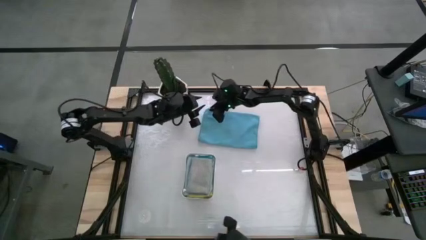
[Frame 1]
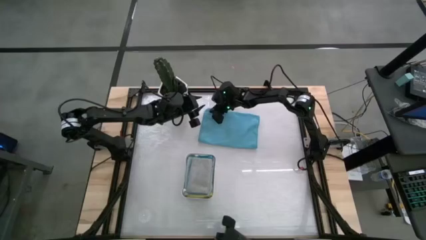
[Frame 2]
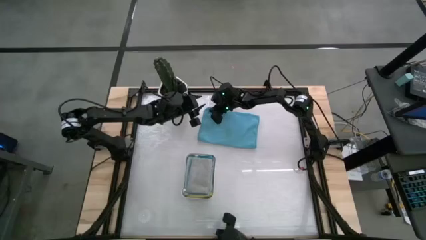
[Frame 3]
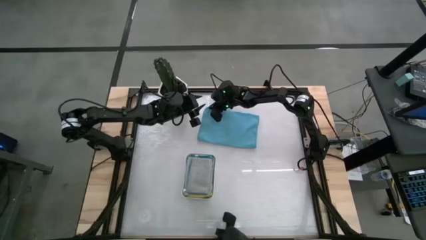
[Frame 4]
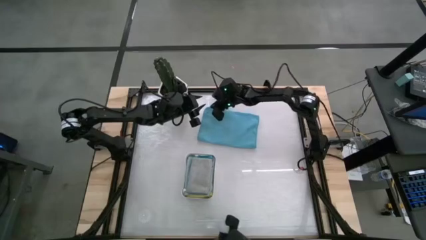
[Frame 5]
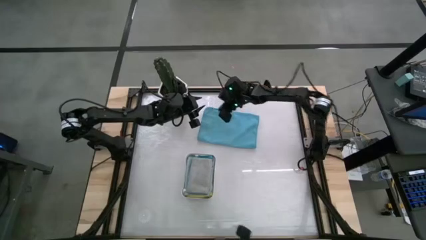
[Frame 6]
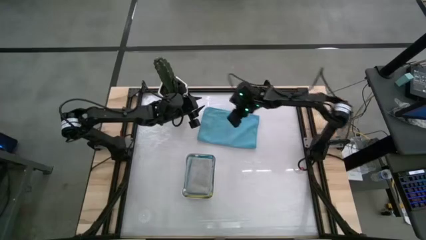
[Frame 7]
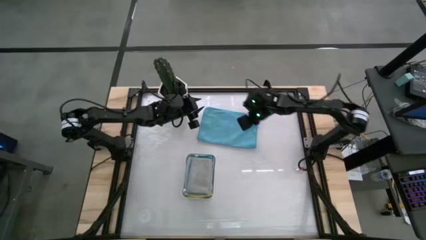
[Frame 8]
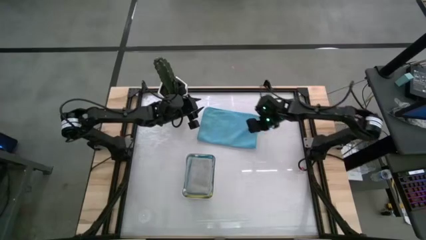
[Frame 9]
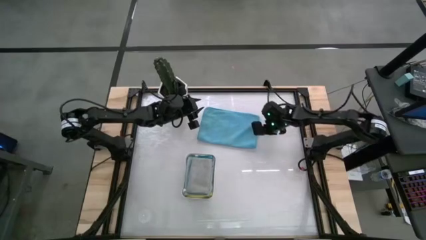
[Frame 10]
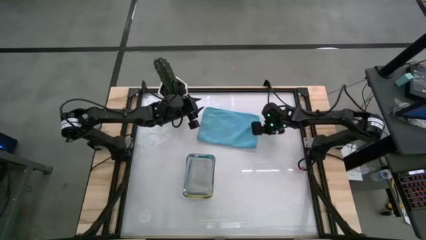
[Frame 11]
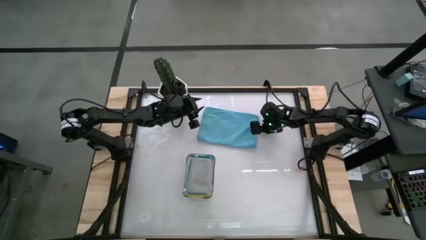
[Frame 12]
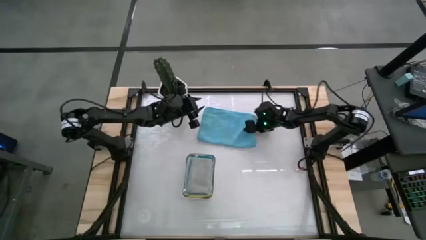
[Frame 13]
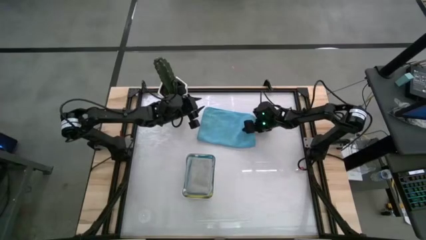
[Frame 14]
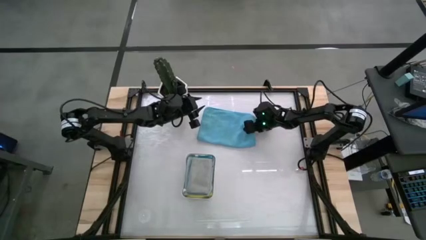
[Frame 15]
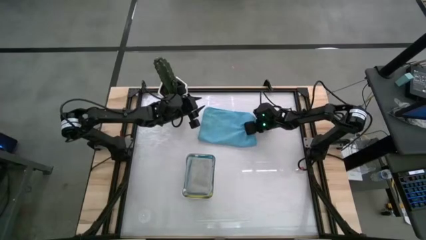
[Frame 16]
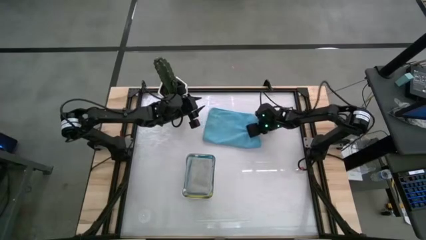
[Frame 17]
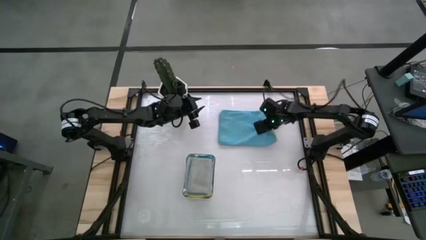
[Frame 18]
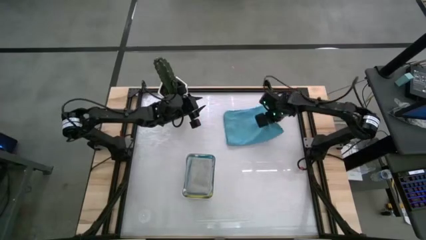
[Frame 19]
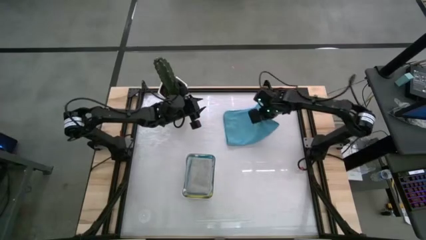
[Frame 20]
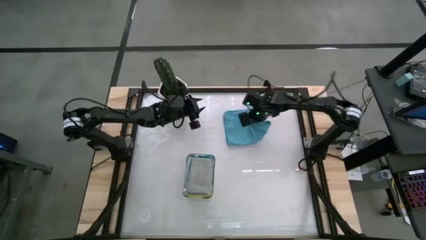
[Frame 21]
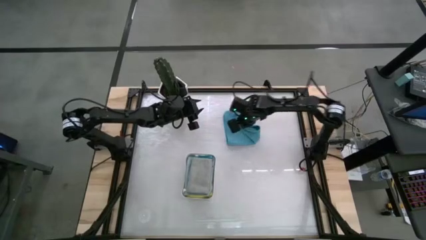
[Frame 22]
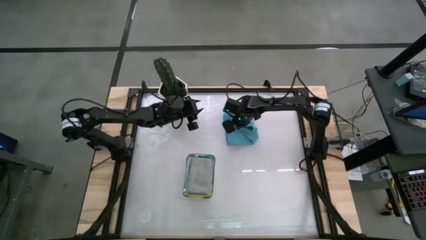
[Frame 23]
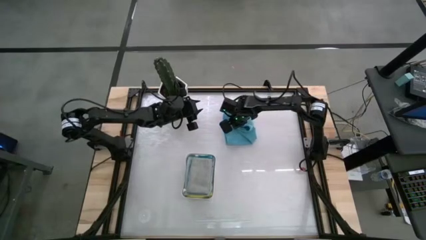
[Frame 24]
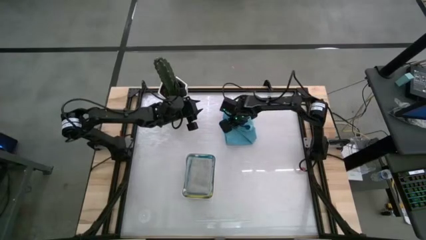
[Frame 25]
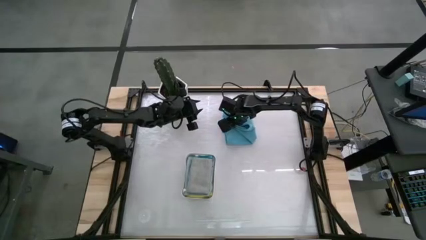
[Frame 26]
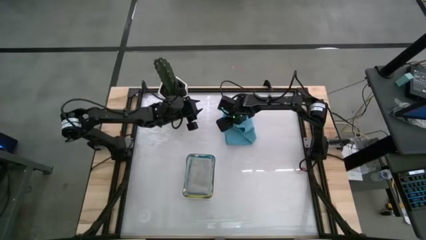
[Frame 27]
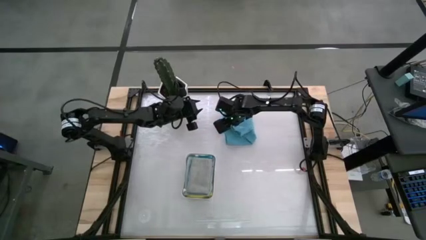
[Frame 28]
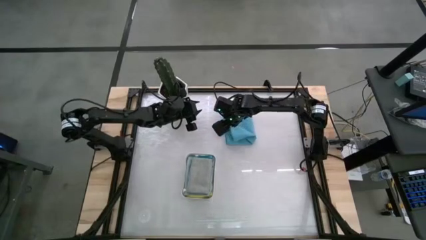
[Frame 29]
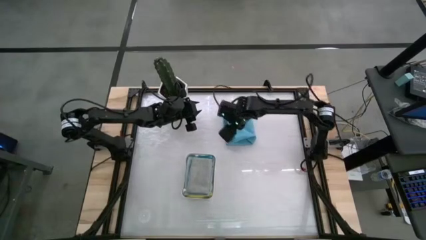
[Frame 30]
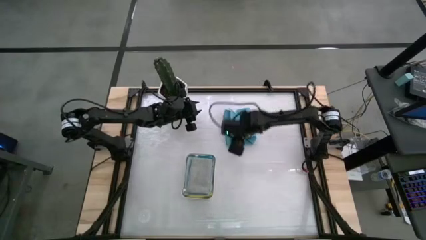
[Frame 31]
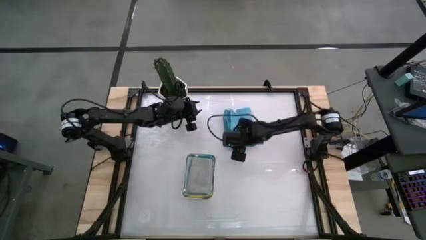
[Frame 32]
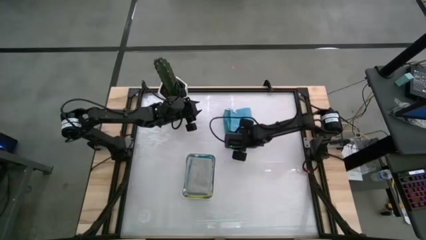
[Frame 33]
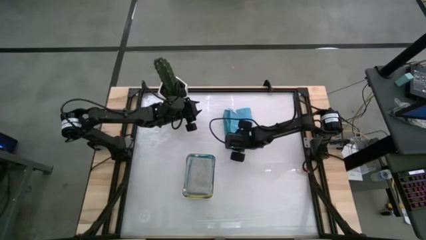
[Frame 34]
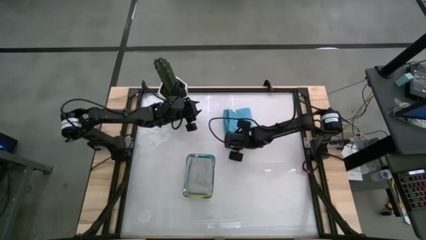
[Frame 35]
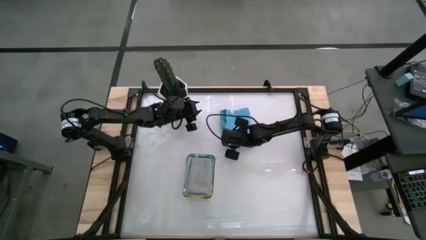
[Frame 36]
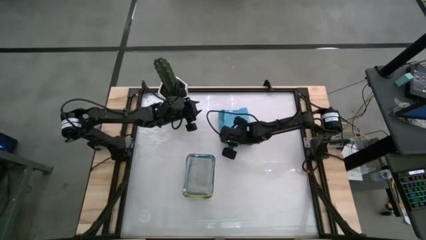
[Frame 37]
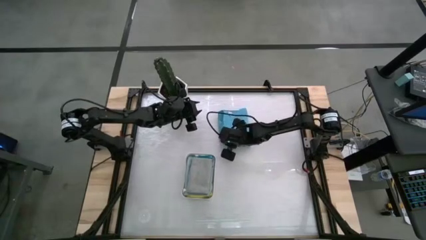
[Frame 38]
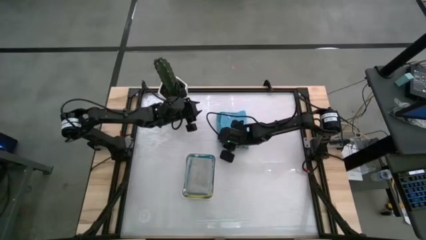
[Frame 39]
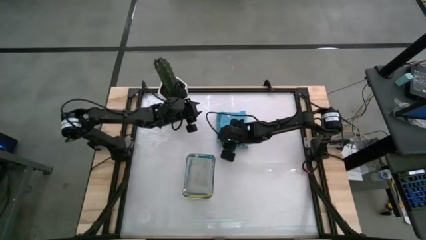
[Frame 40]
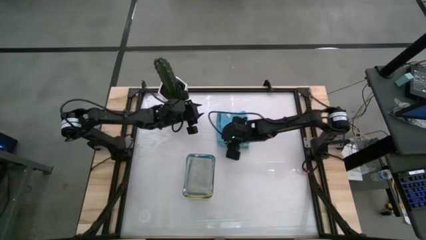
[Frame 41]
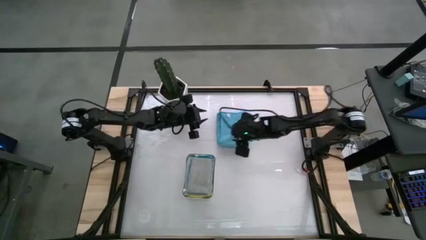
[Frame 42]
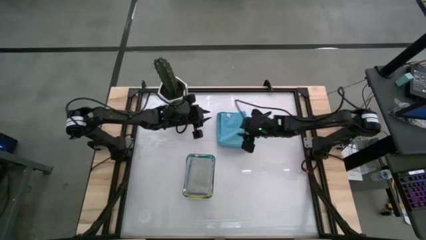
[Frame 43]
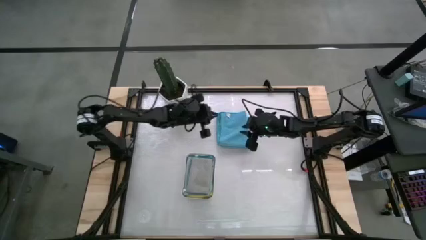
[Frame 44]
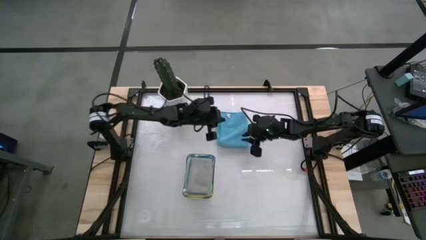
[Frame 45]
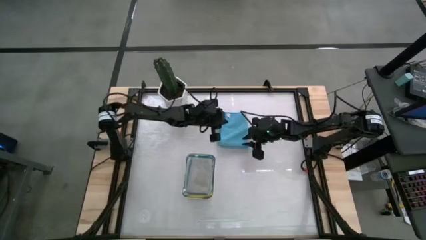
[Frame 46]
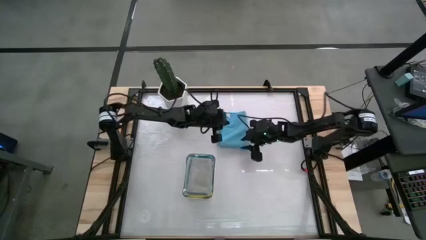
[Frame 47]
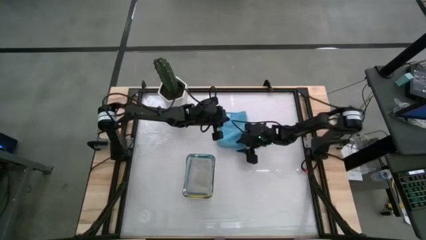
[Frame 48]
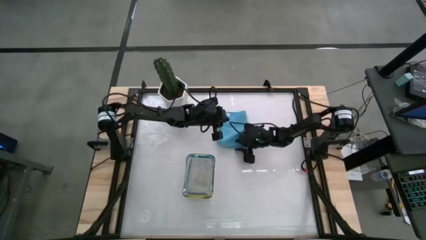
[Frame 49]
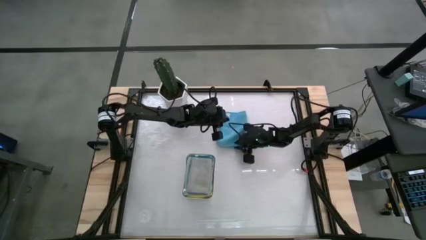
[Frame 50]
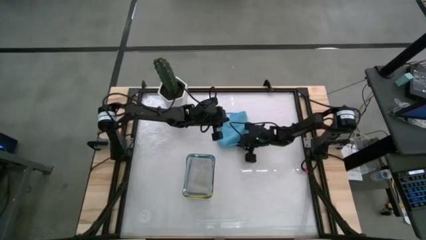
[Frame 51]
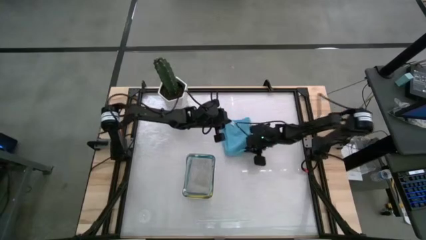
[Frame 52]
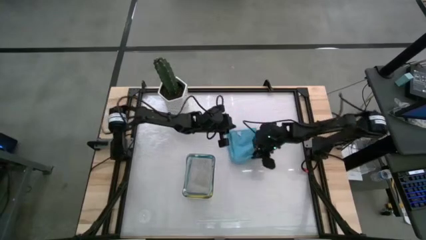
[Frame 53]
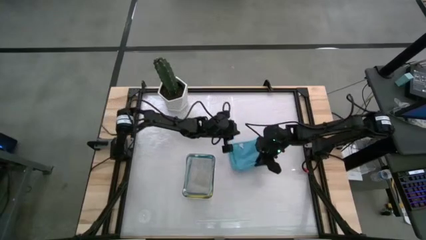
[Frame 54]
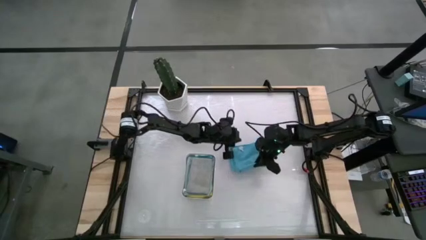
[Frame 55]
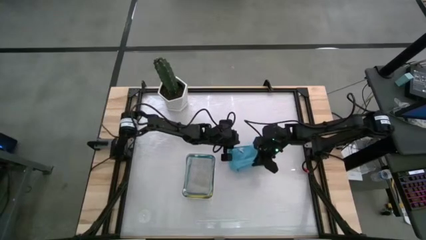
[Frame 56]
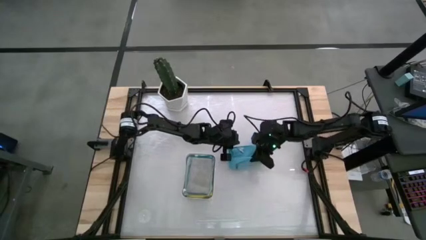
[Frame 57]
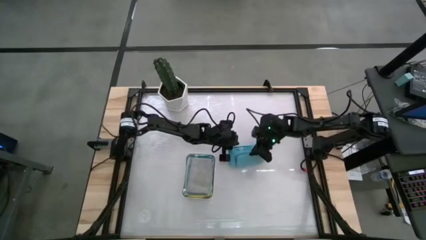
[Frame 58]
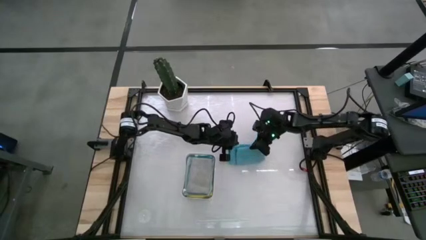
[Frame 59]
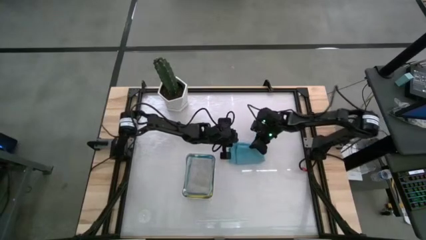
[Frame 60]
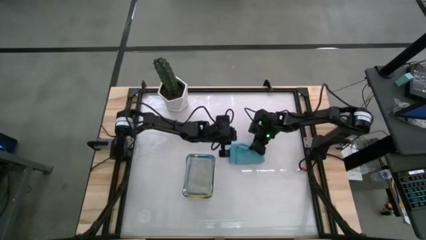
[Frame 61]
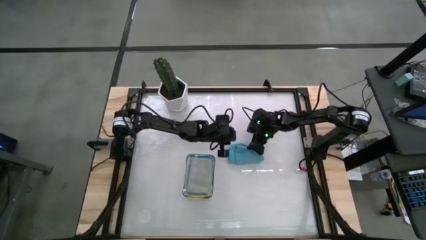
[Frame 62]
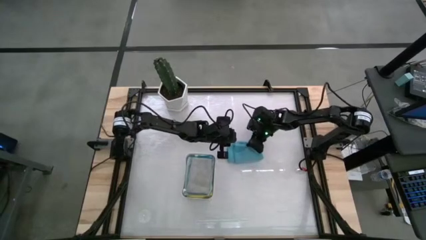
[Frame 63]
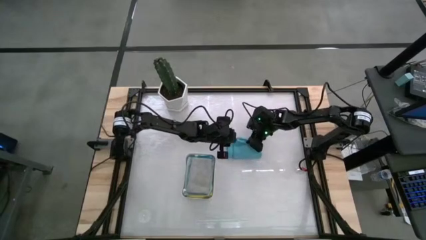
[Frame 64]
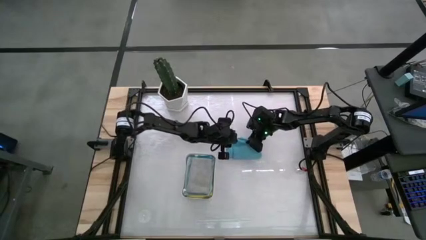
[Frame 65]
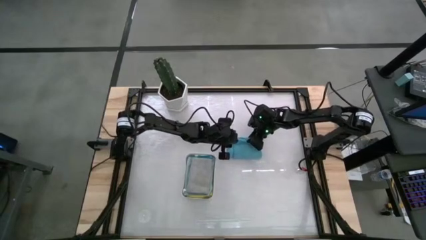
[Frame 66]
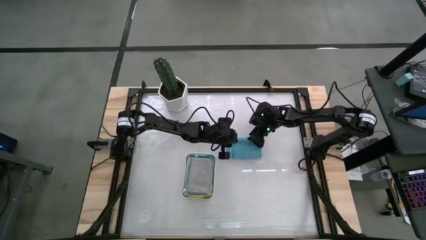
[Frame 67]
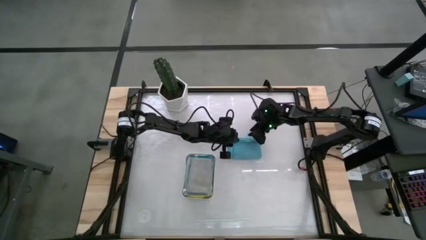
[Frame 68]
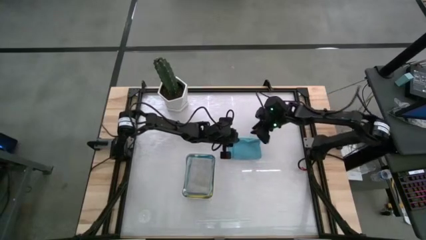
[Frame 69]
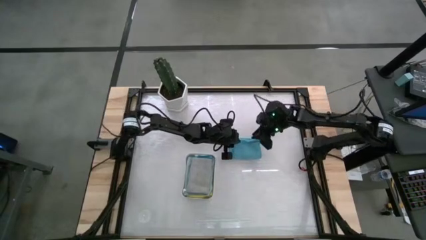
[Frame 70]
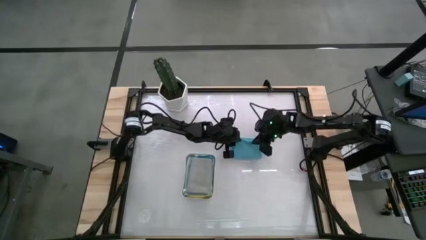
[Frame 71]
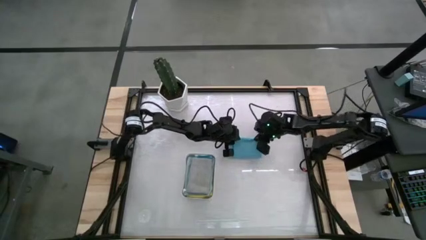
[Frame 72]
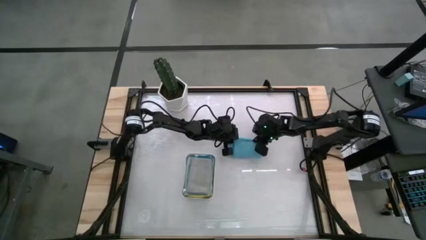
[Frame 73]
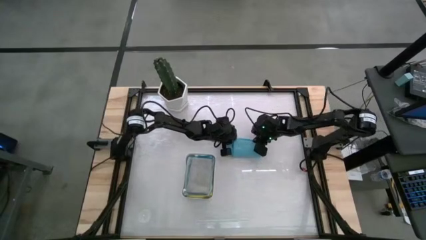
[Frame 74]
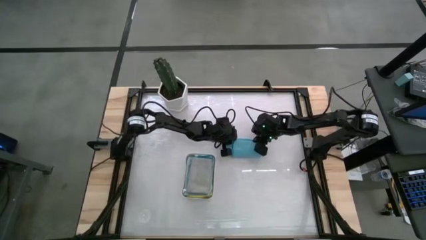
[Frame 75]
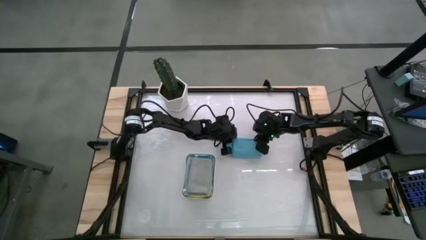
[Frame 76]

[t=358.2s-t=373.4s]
Task: Fold microfiber towels
Fold the blue microfiber towel
